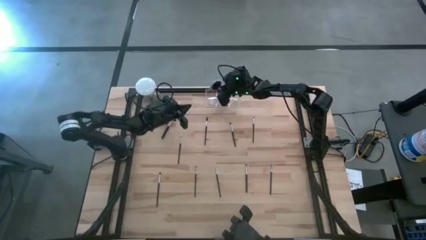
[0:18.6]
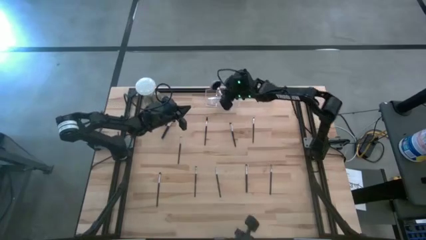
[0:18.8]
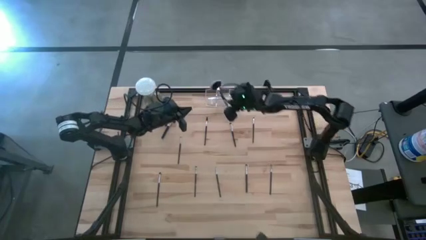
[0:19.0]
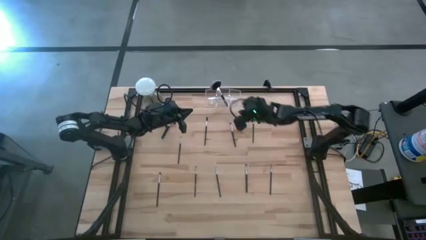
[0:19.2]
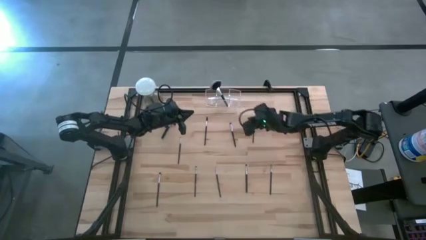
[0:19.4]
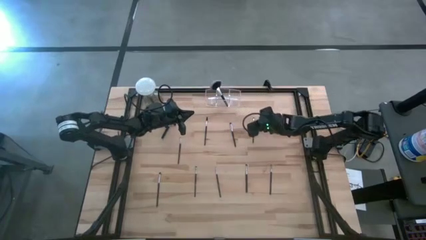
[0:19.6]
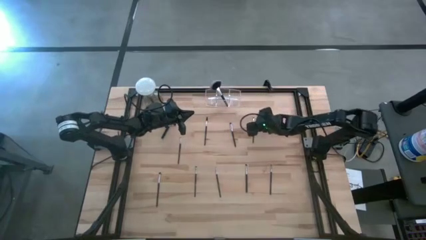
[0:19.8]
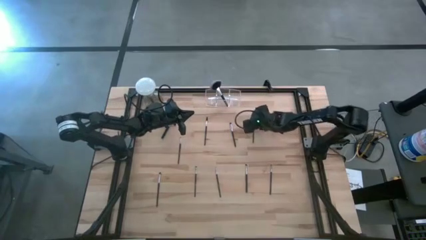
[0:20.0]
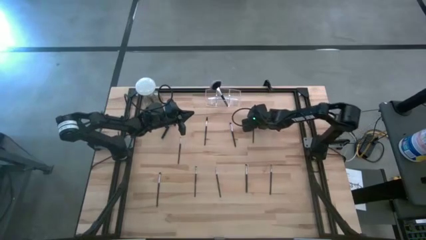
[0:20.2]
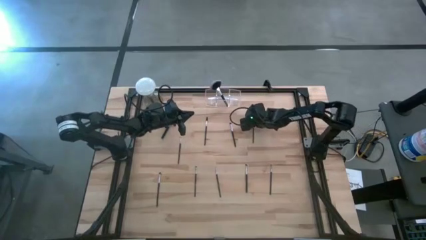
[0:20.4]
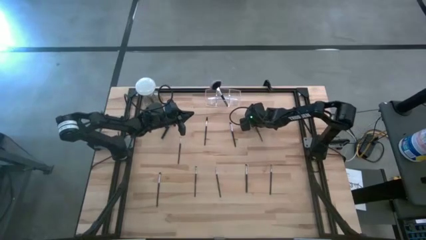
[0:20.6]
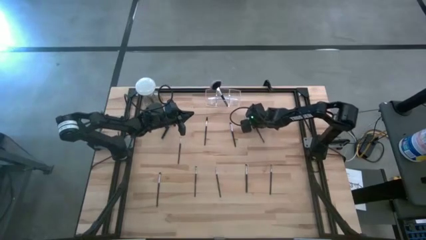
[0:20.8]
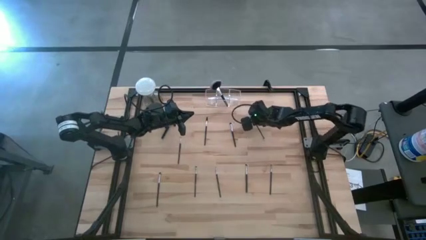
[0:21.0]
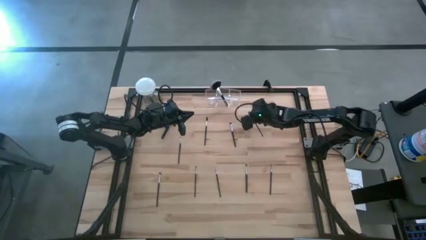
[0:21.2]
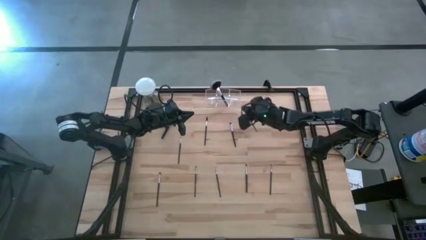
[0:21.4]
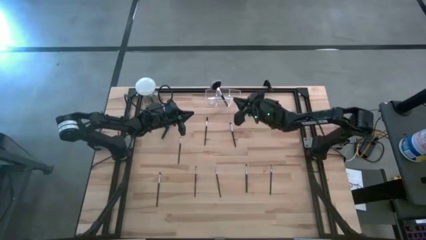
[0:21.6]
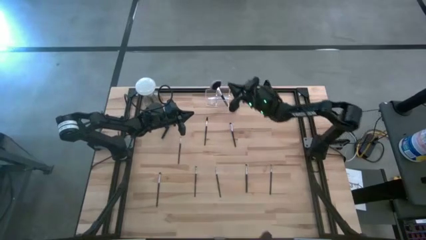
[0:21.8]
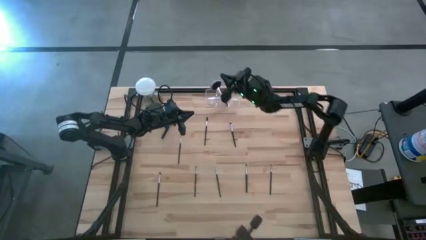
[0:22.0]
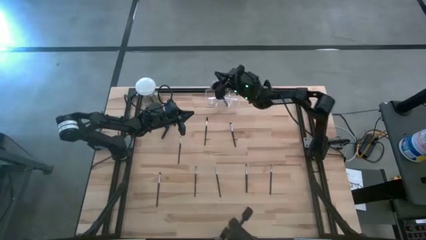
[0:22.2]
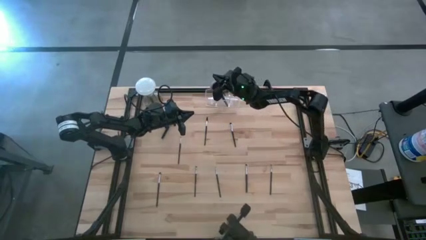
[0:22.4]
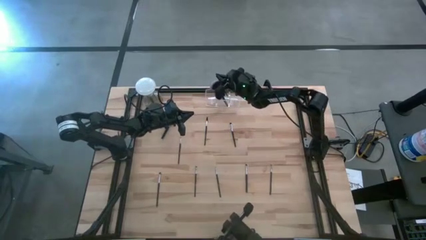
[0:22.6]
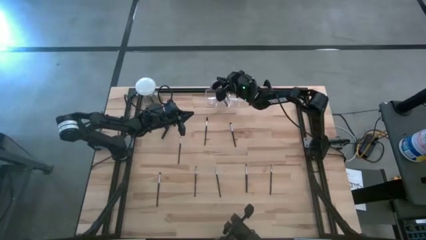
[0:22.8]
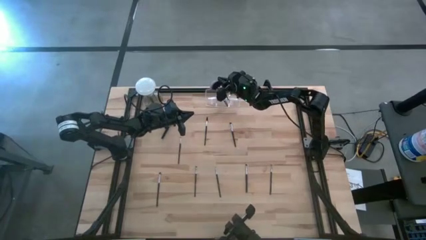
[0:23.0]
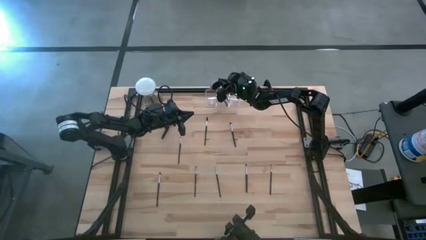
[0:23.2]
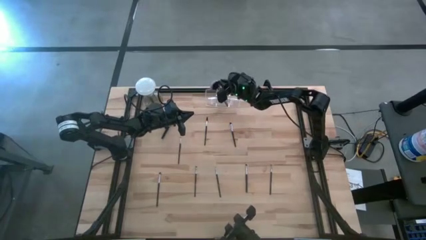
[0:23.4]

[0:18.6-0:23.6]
Task: Pick & Place Makeup Brushes
Put the black eyeshadow brush into the transparent organizer

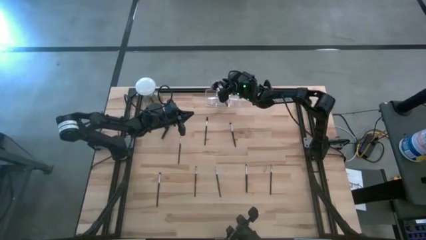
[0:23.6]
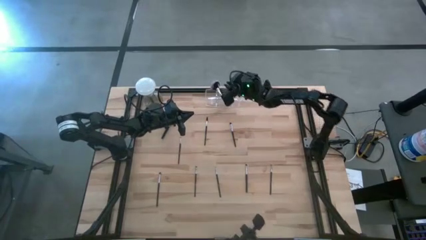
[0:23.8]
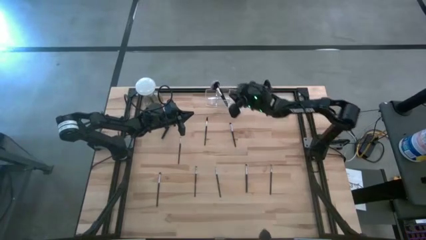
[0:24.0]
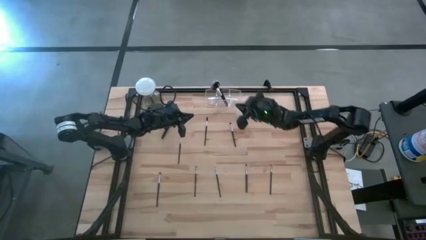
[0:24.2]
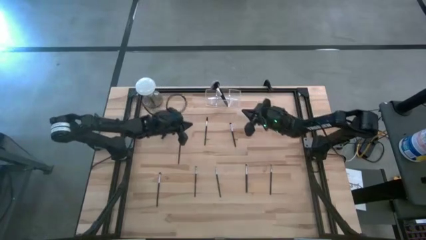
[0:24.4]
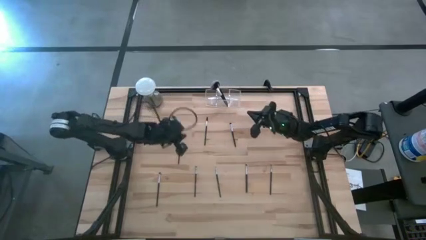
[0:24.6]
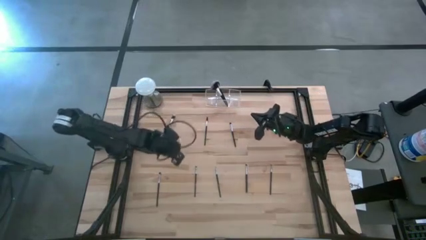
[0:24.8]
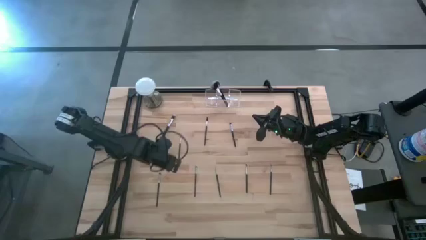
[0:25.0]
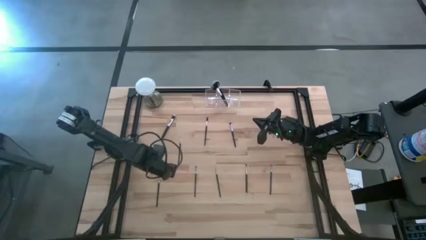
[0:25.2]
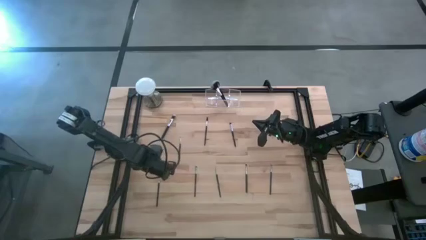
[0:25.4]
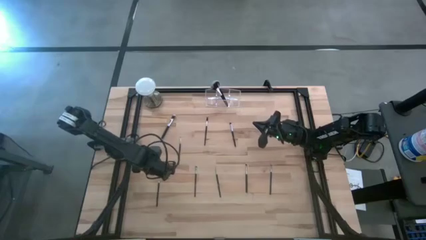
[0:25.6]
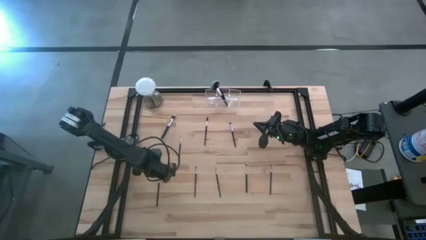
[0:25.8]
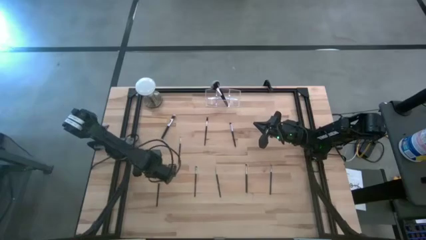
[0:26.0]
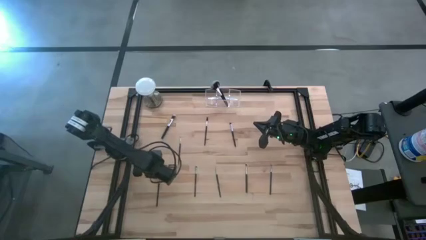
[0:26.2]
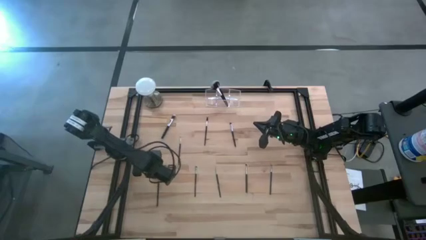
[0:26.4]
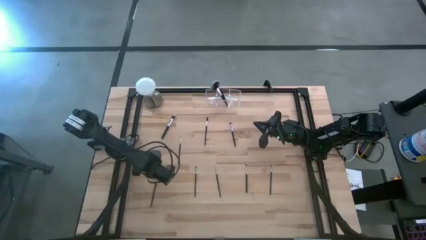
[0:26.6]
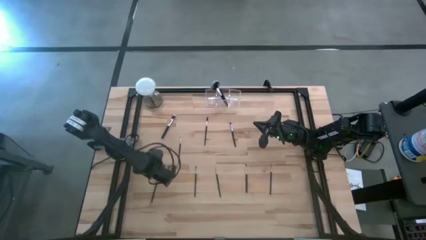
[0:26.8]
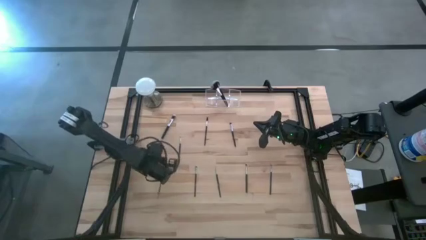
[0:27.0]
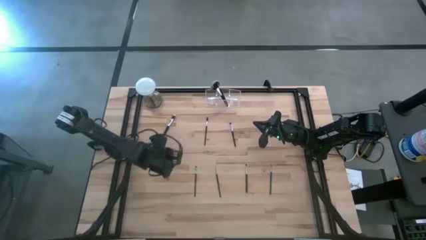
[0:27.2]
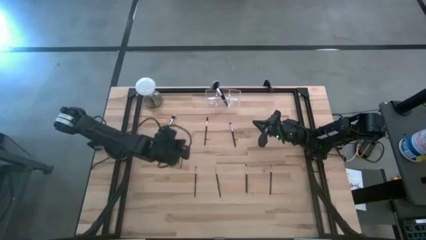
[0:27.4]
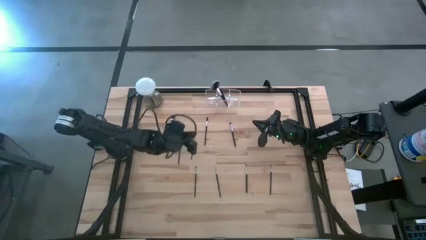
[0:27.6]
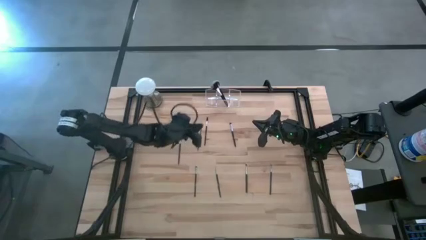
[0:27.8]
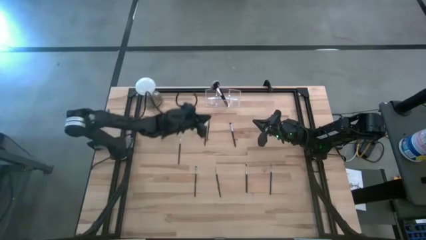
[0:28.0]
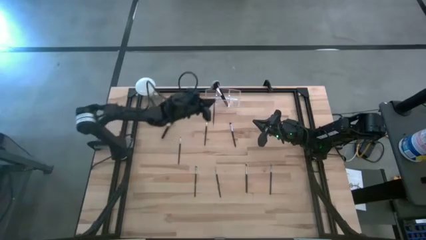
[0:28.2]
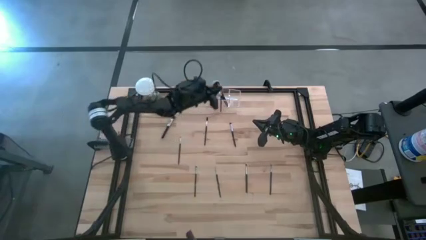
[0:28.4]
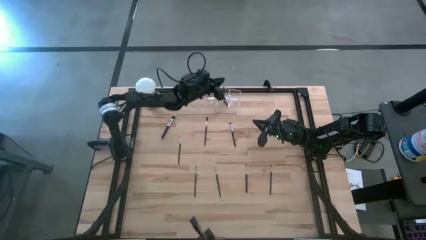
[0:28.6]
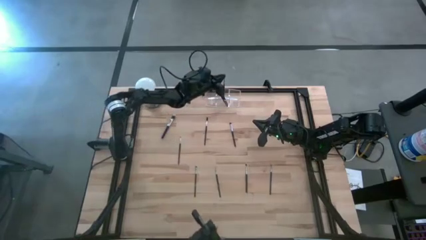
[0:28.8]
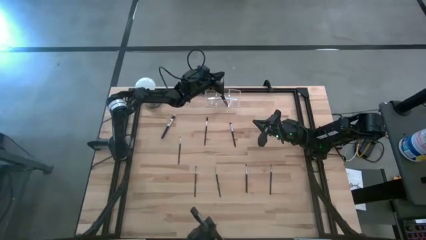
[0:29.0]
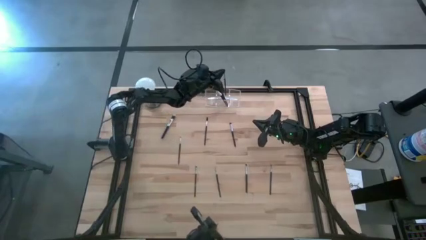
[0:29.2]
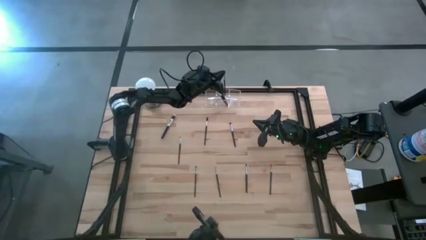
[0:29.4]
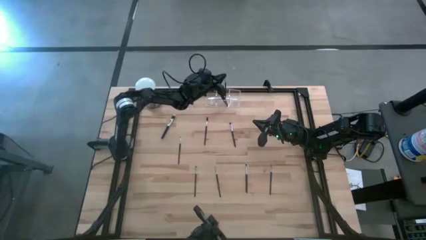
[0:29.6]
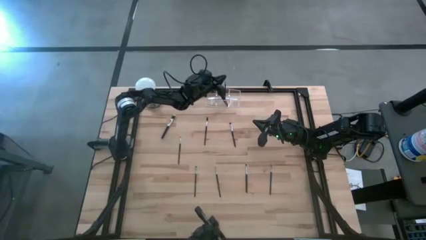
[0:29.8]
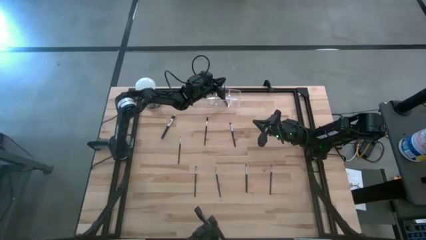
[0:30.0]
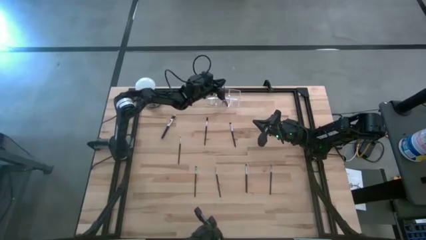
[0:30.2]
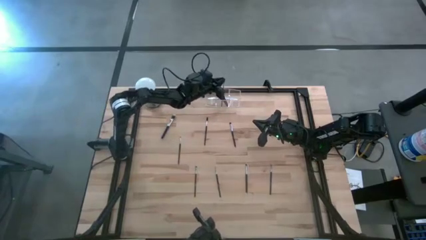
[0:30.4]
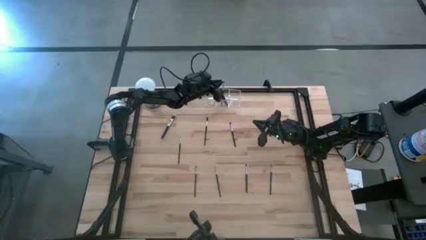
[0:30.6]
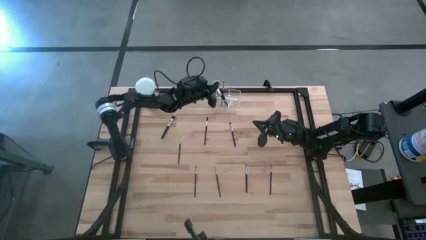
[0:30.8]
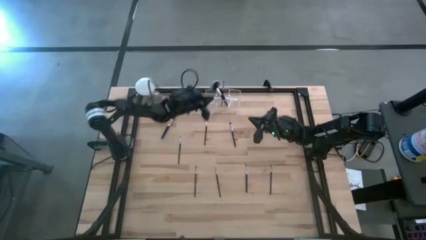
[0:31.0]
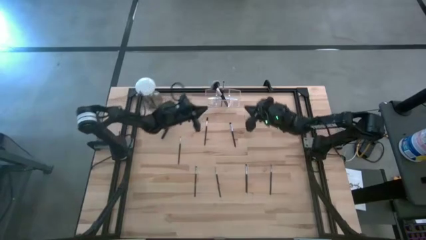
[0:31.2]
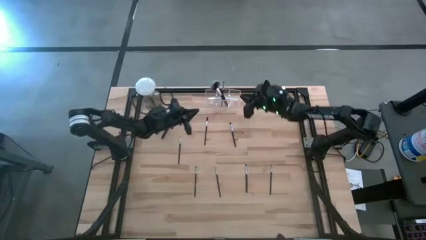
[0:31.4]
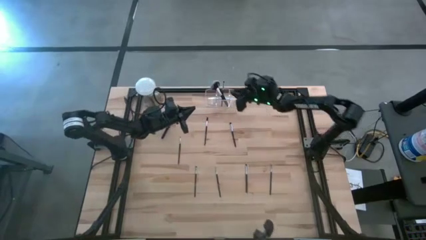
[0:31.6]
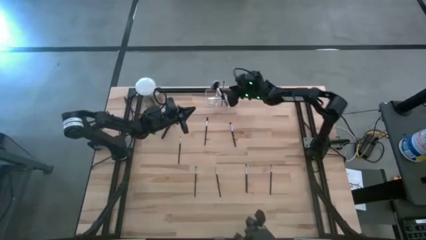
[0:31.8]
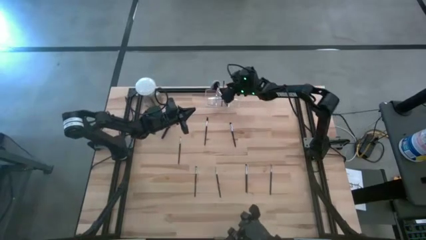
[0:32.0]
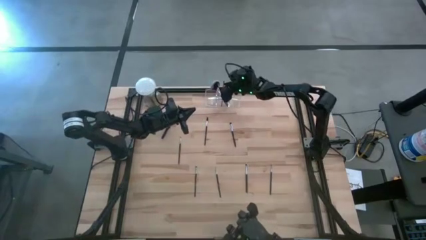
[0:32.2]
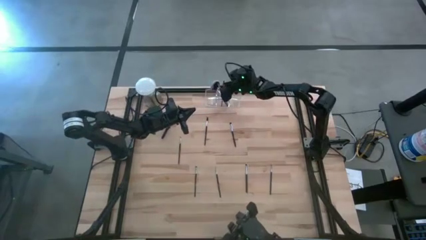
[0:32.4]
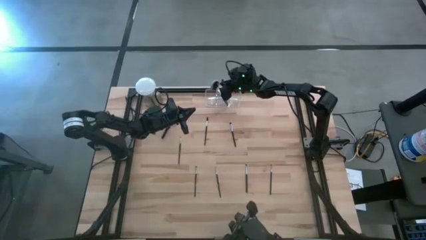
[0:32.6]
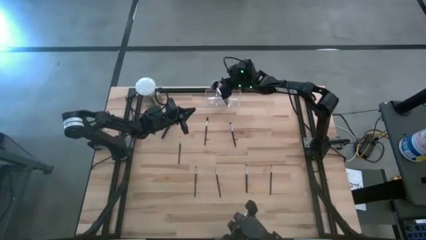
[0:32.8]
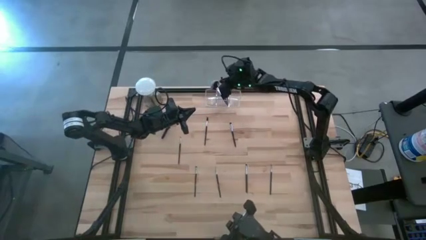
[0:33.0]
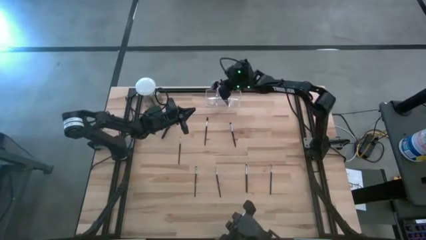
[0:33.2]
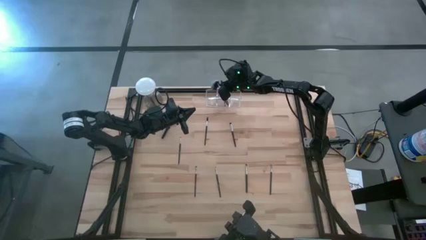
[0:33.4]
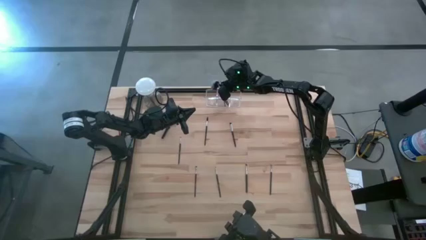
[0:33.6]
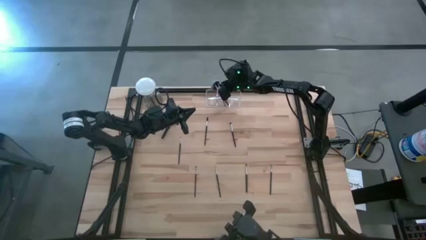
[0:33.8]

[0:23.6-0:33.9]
Put the black eyeshadow brush into the transparent organizer

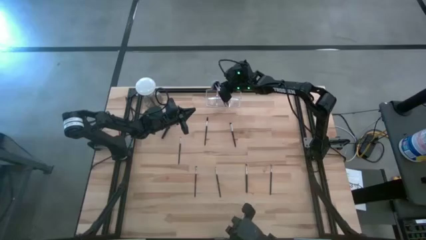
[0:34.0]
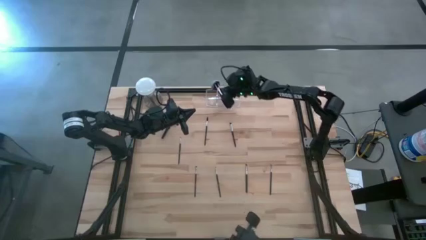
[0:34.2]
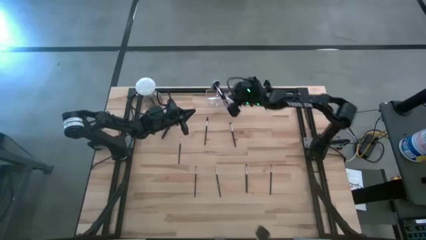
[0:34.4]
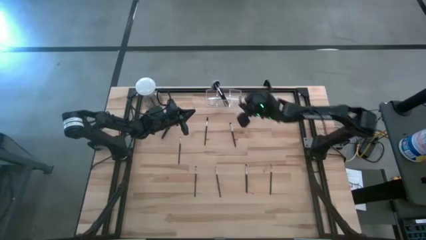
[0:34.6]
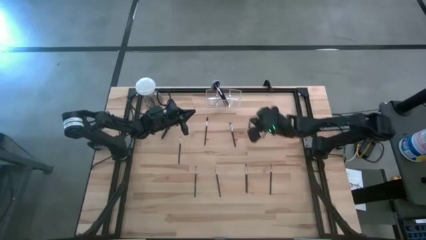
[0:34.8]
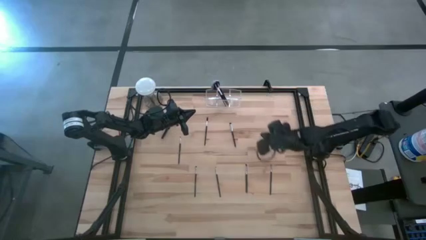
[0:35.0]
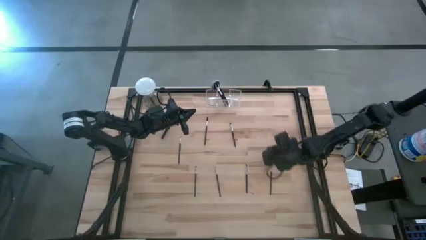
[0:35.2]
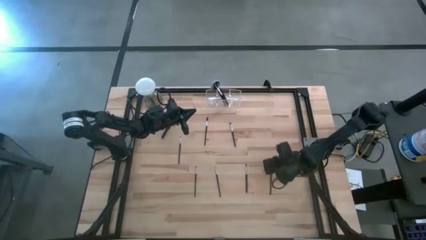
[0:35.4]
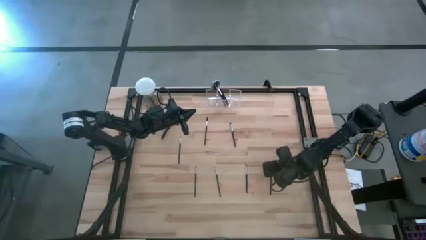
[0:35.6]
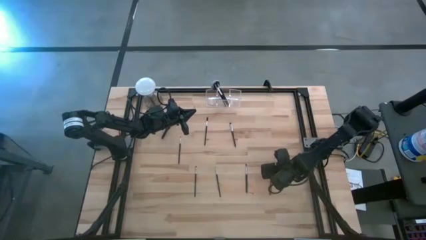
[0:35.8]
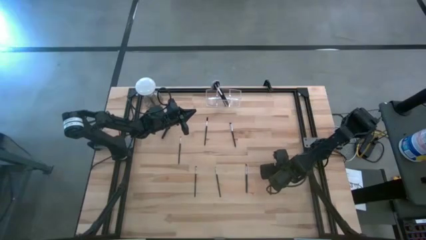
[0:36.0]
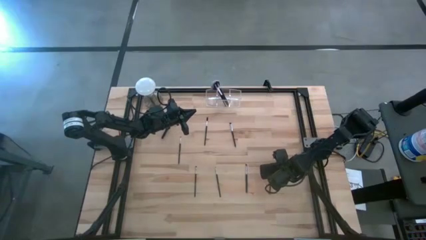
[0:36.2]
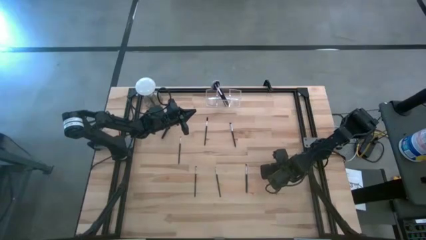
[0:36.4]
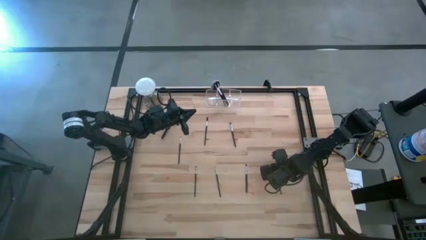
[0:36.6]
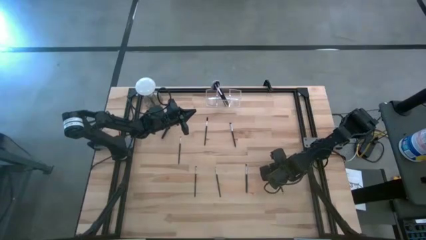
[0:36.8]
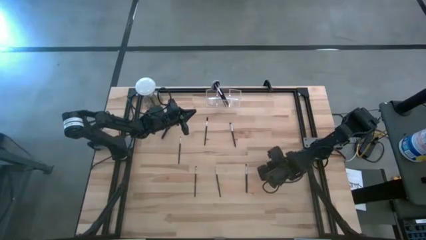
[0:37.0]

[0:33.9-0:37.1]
Put the black eyeshadow brush into the transparent organizer
